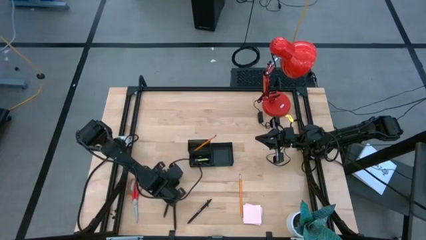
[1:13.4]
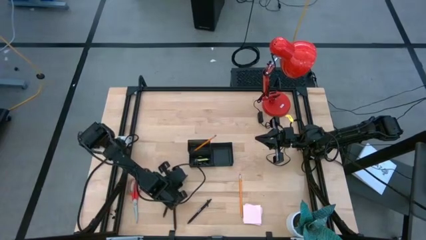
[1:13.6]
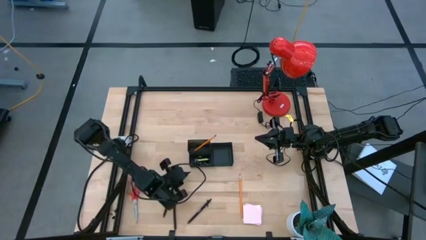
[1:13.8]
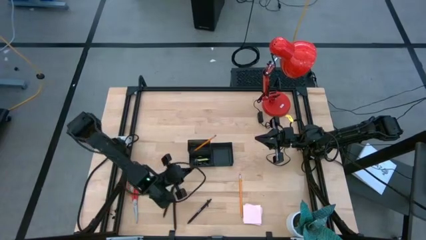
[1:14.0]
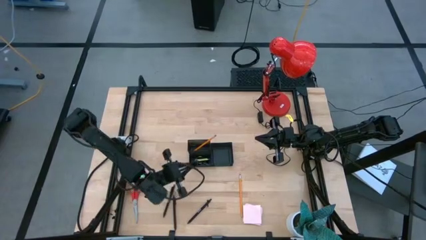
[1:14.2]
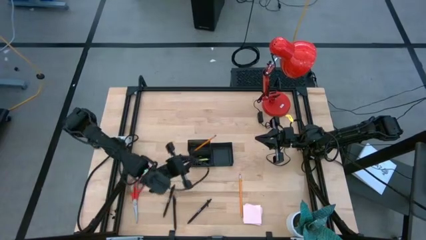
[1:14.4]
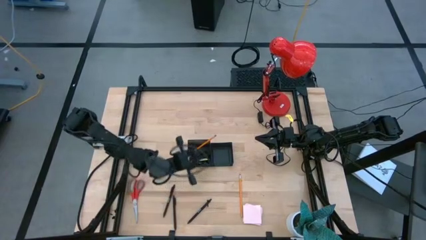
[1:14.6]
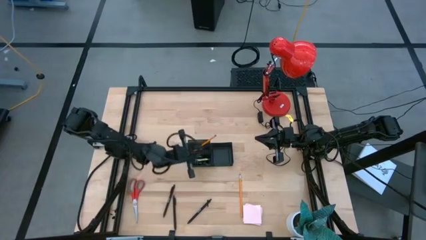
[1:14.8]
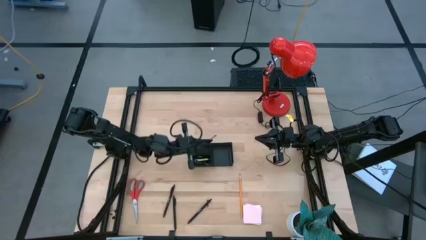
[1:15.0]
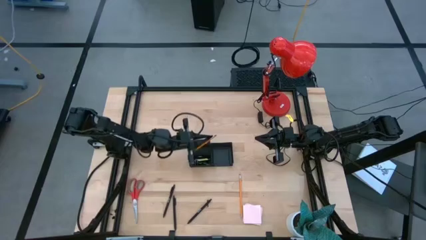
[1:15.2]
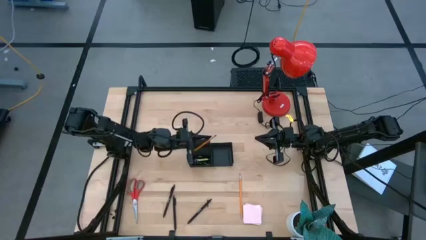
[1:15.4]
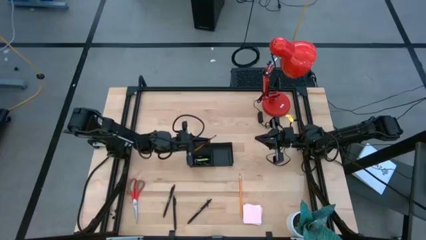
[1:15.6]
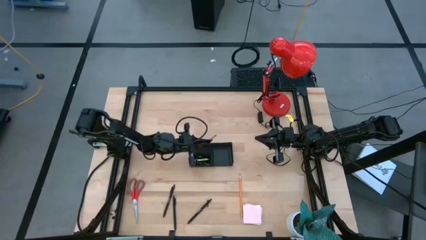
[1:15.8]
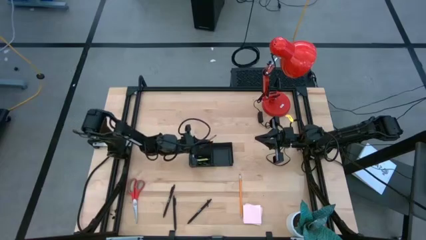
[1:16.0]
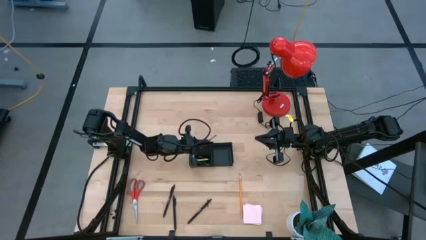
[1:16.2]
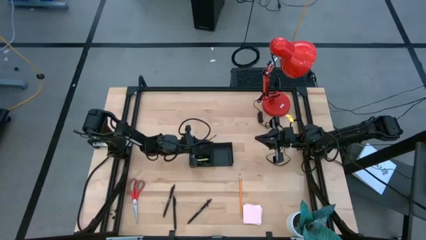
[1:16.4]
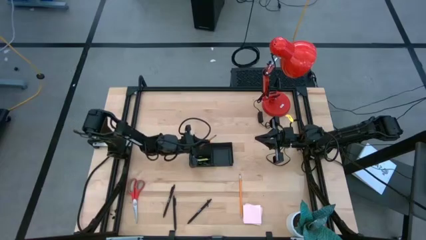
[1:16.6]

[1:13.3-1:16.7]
Task: Pick and place office supplies into organizer
Put the black pen into the mesh desk organizer

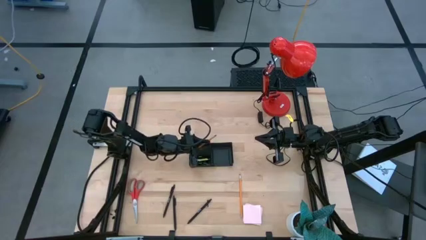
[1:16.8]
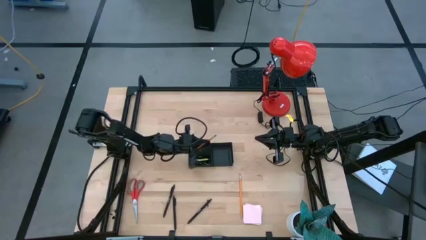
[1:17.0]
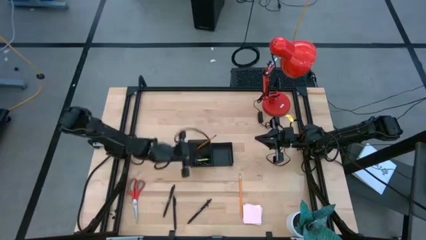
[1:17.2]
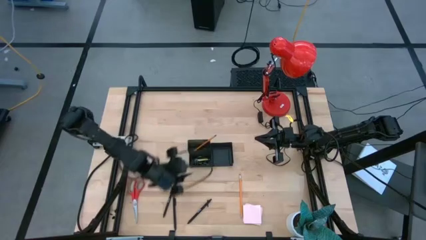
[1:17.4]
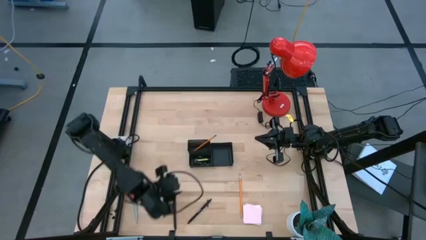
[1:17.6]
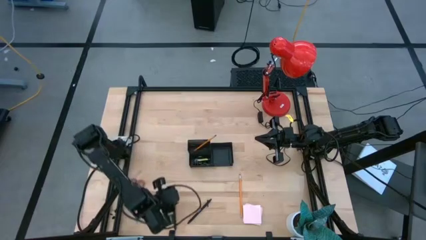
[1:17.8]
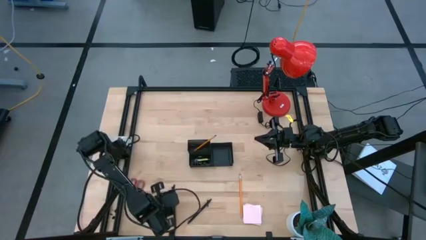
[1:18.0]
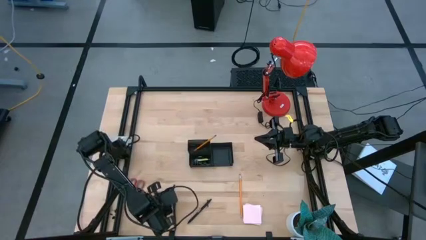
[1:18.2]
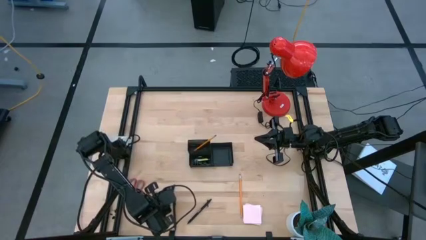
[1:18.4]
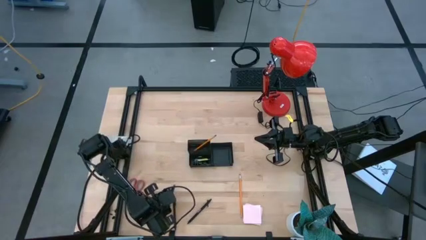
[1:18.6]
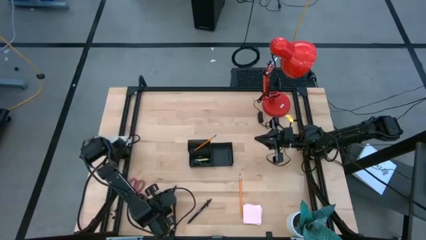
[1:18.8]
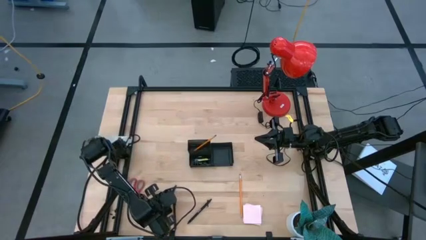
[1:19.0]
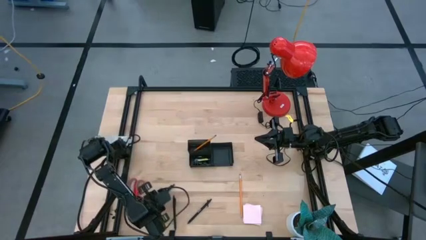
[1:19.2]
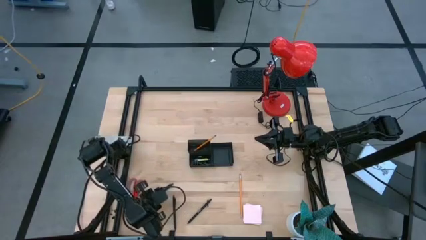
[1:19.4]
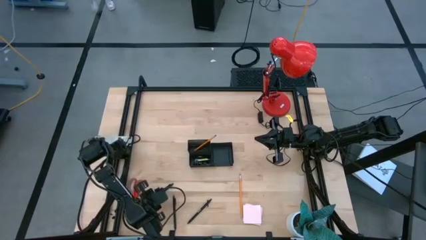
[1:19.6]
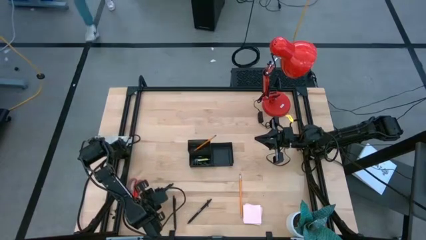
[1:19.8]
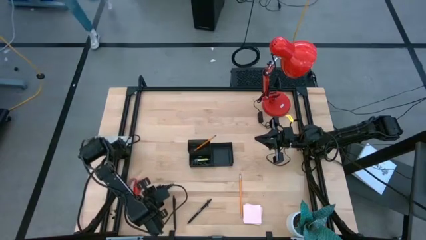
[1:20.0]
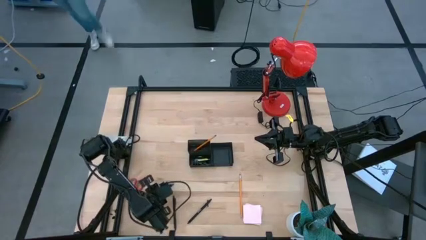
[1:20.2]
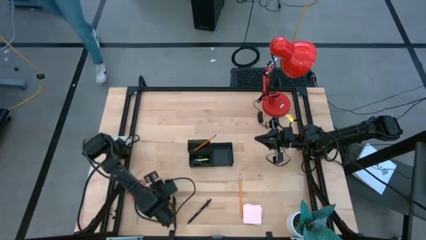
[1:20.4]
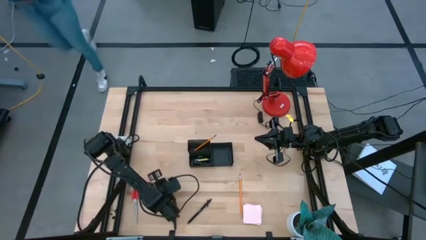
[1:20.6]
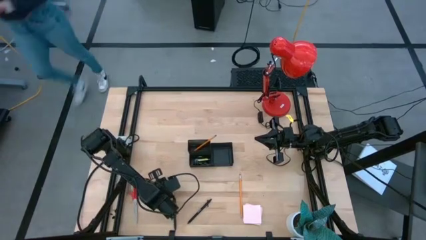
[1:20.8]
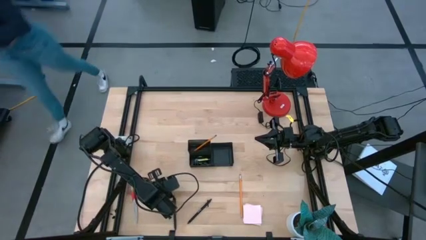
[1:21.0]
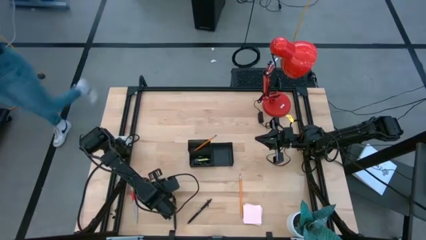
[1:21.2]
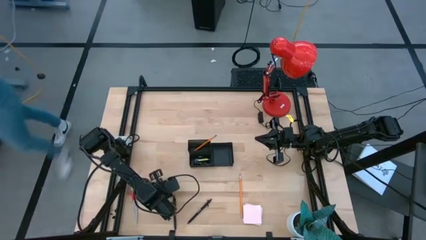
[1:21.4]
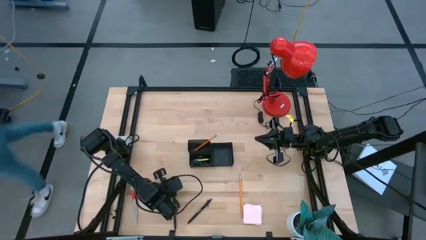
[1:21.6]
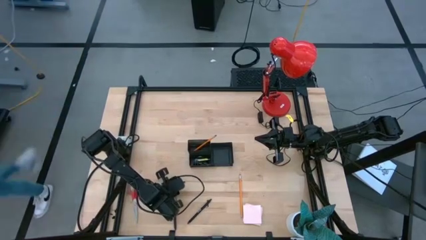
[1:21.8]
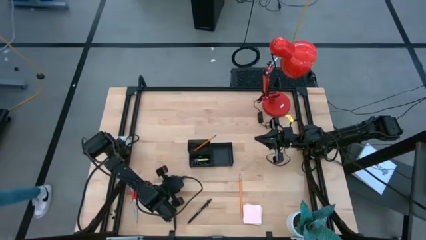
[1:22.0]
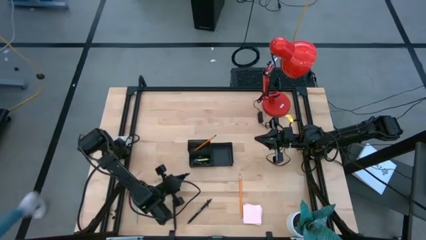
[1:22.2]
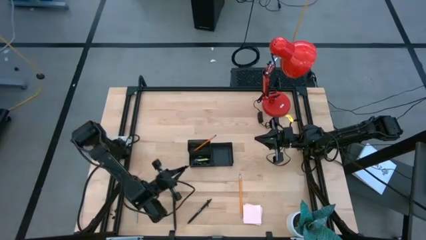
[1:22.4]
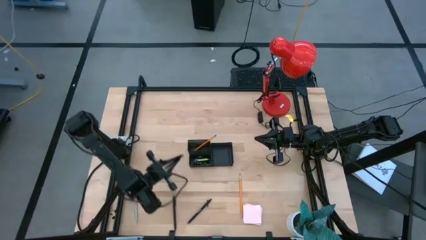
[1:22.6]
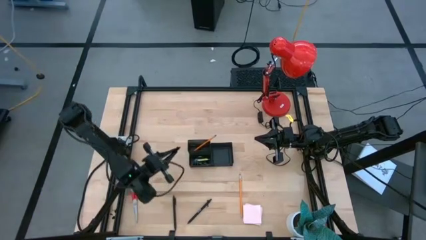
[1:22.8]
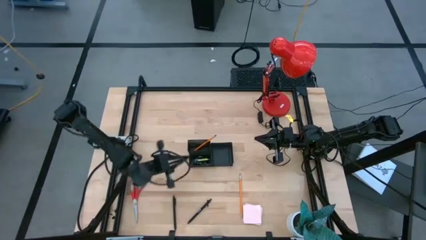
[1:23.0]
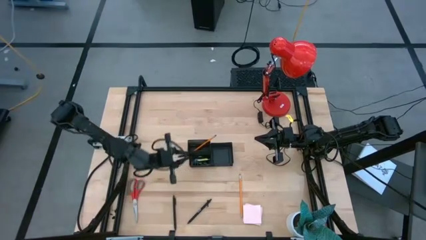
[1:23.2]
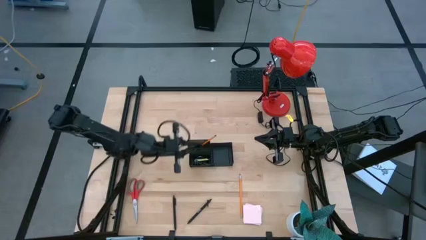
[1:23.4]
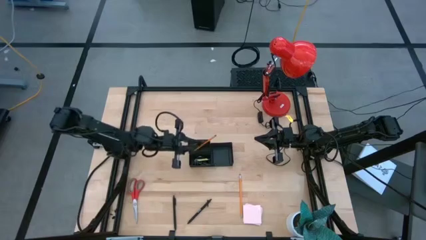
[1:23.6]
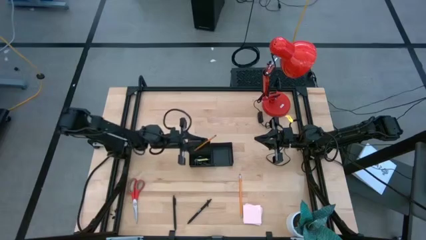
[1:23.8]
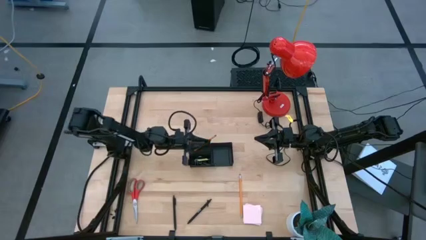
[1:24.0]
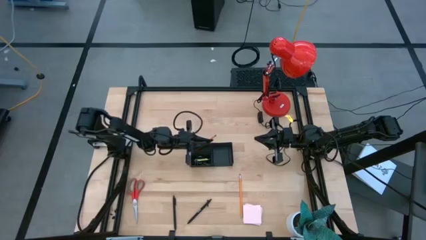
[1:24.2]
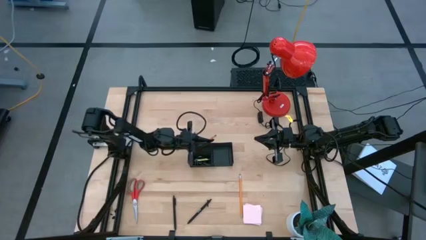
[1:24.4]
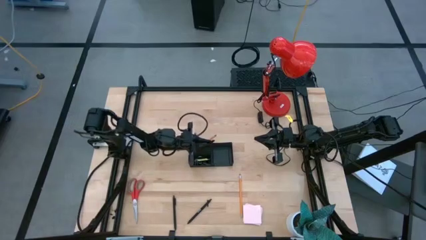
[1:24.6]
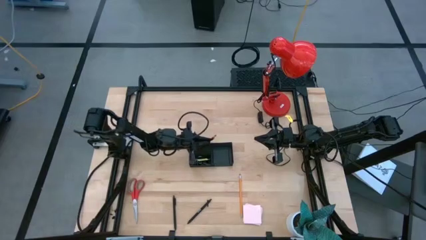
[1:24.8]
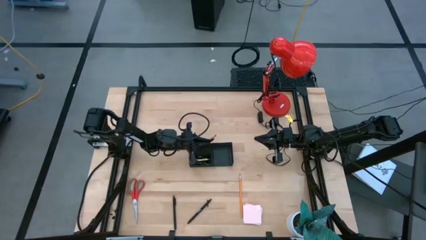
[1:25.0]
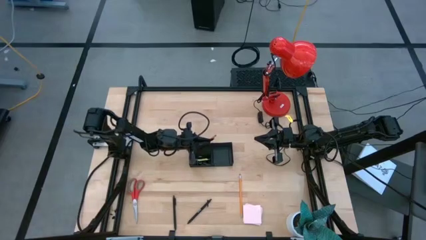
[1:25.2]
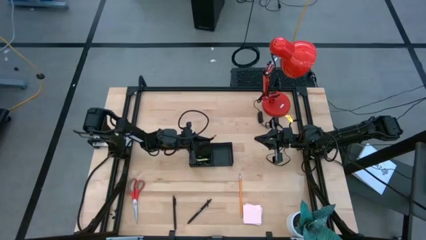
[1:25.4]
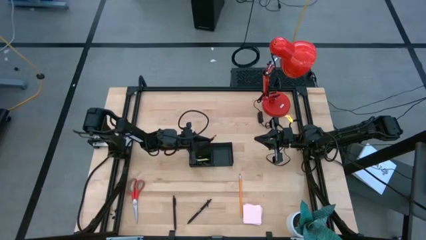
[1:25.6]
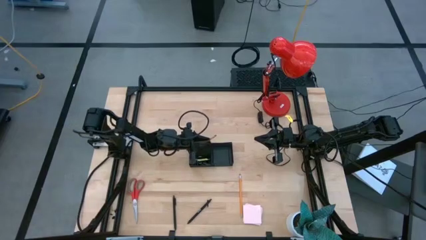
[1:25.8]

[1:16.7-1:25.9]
Put the black pen into the mesh desk organizer
